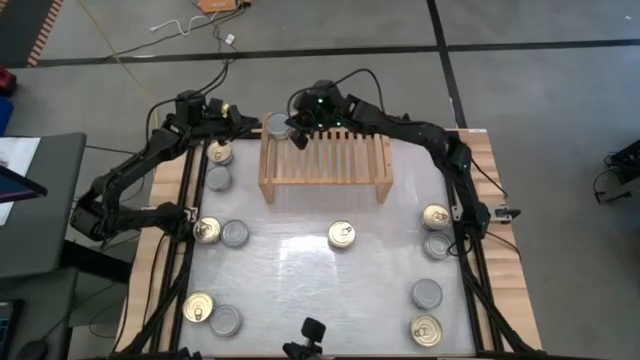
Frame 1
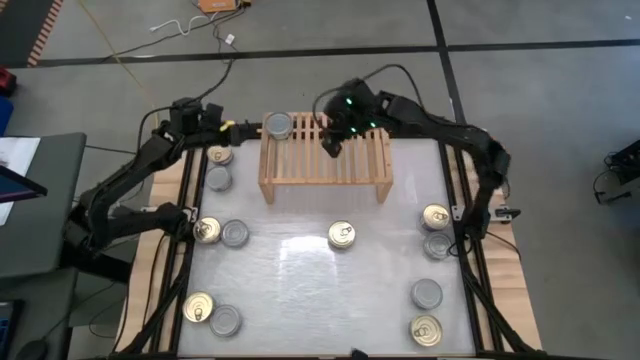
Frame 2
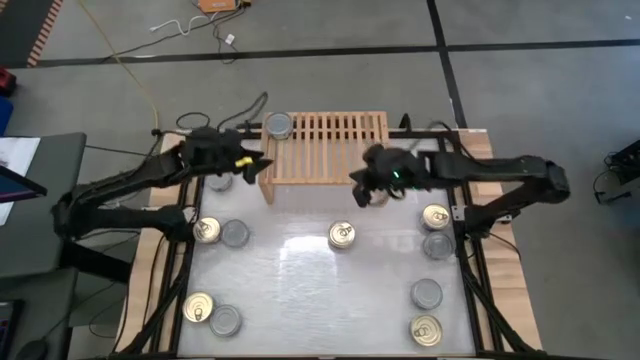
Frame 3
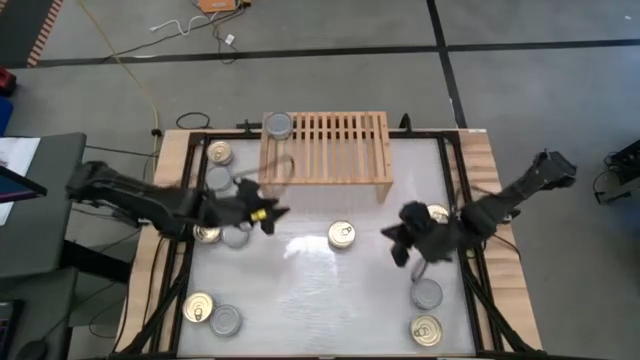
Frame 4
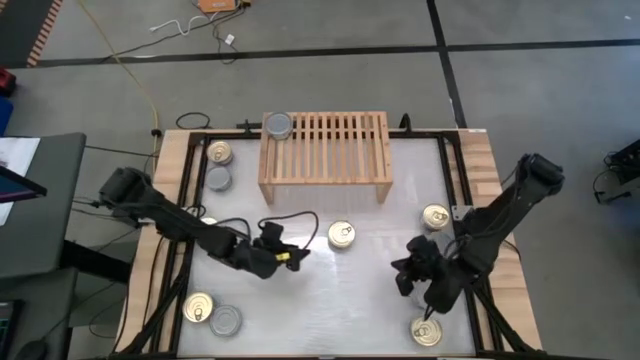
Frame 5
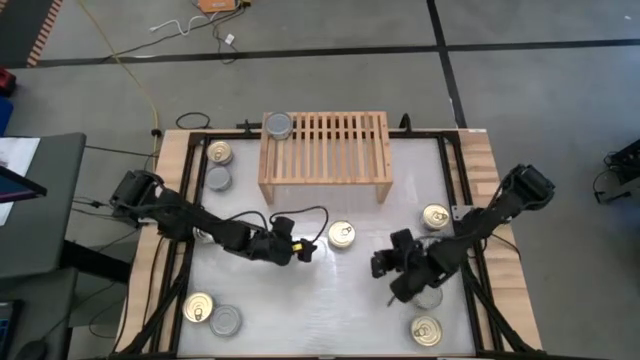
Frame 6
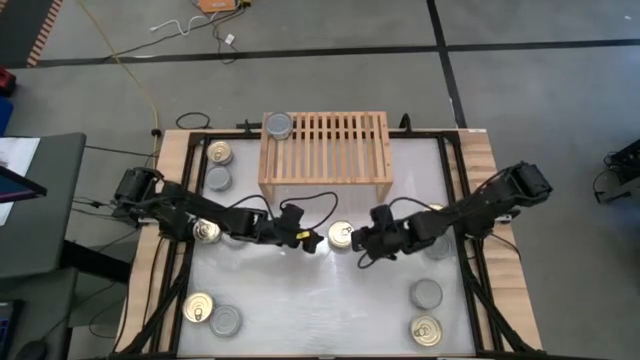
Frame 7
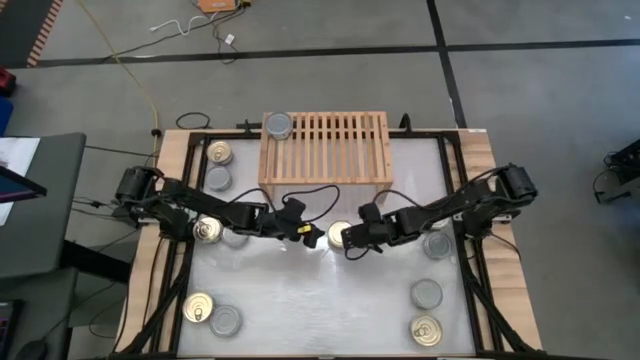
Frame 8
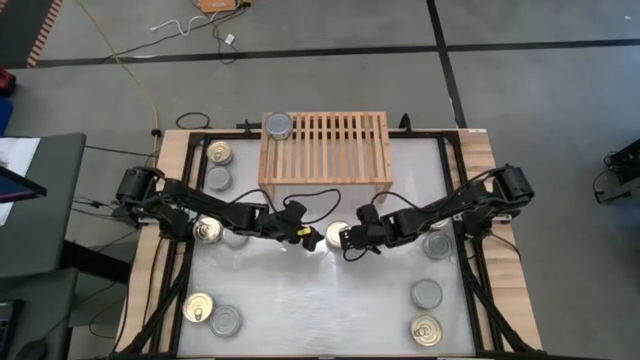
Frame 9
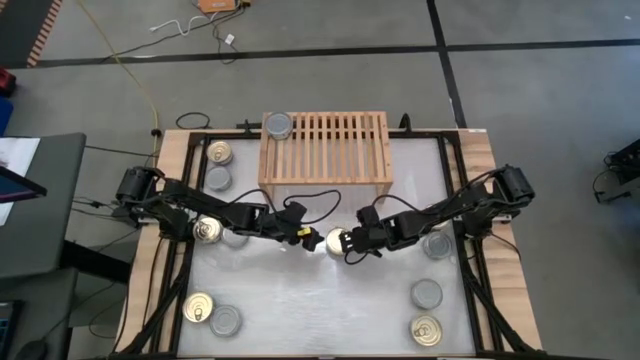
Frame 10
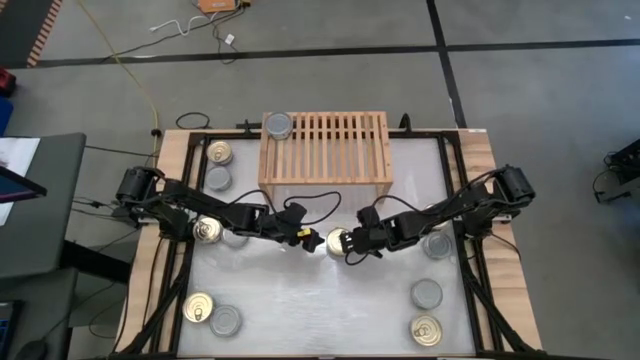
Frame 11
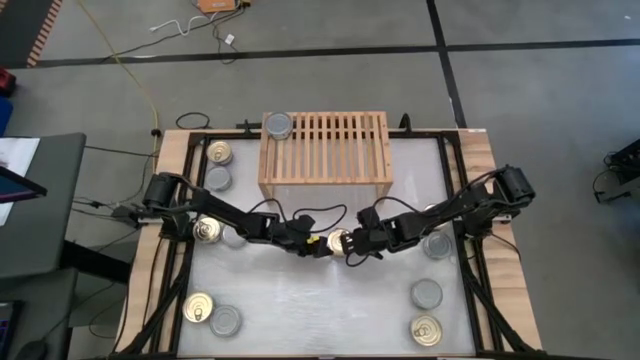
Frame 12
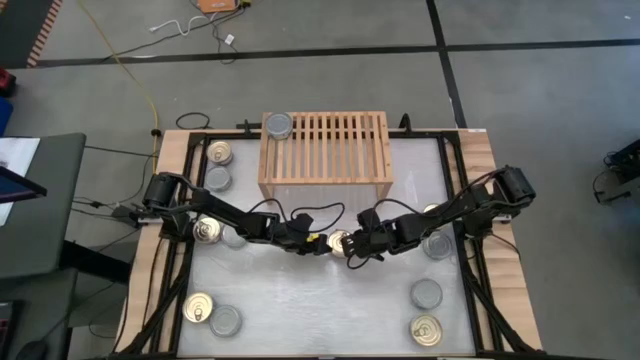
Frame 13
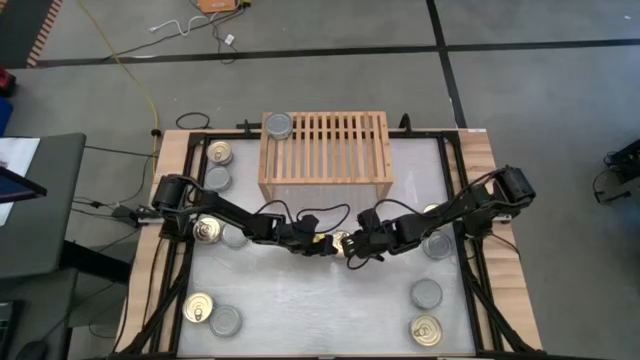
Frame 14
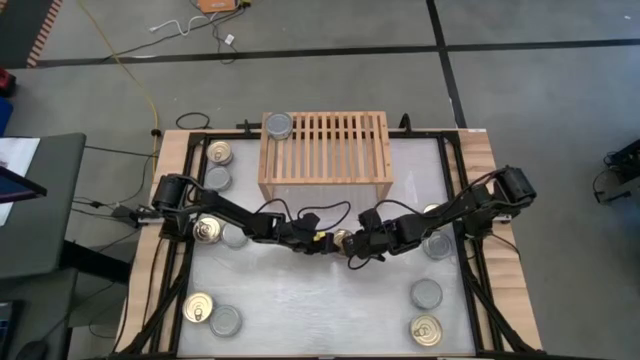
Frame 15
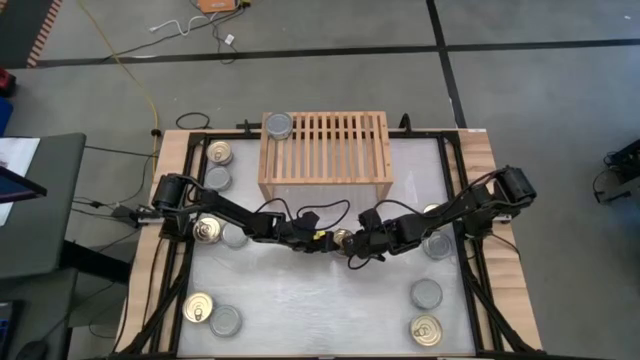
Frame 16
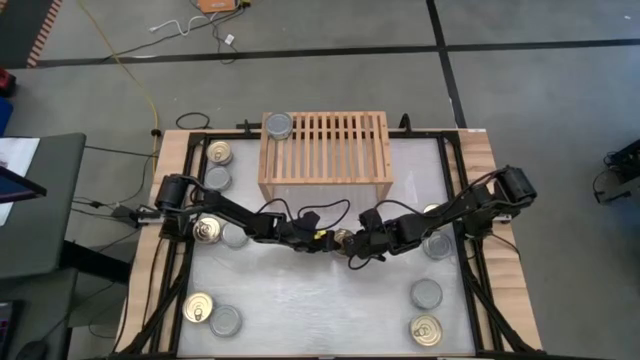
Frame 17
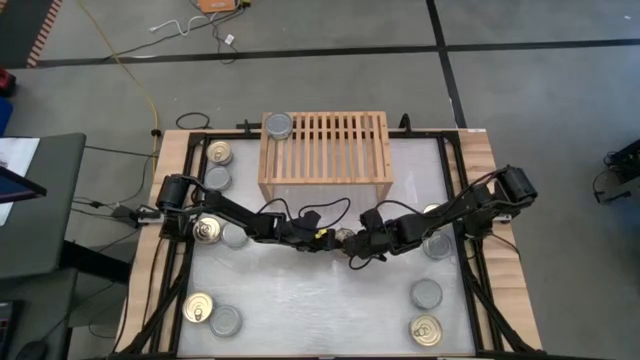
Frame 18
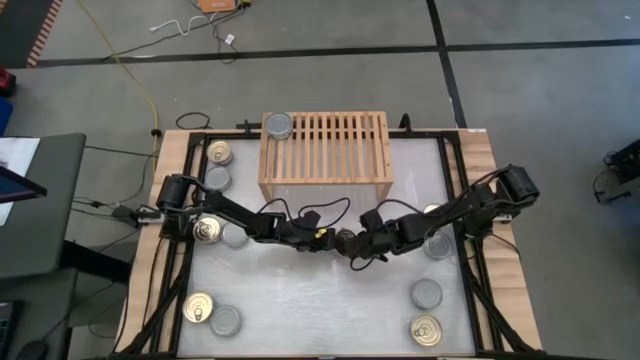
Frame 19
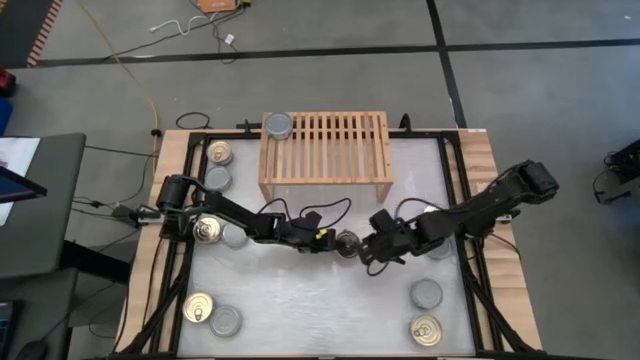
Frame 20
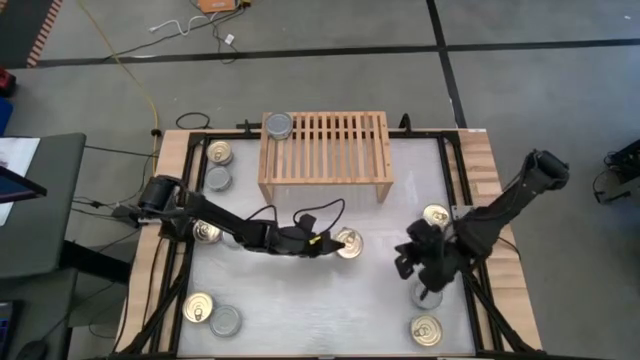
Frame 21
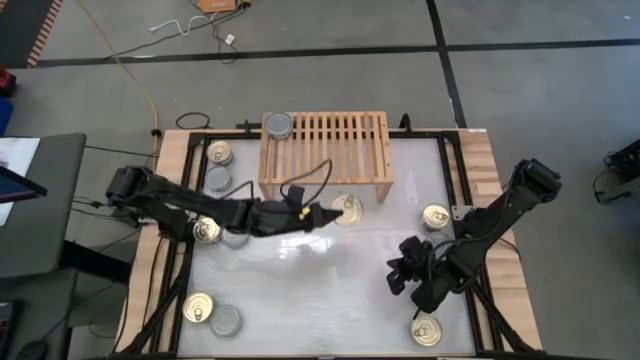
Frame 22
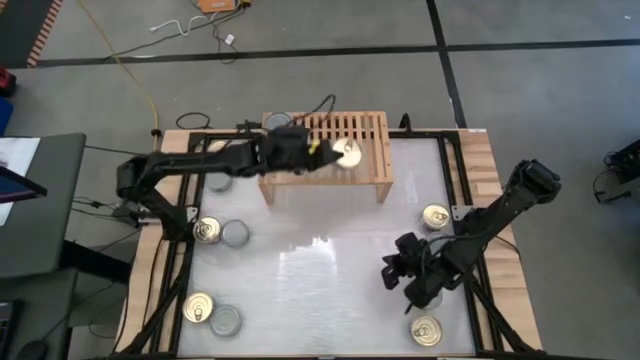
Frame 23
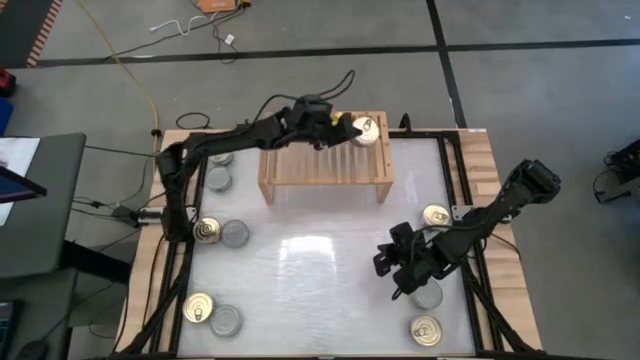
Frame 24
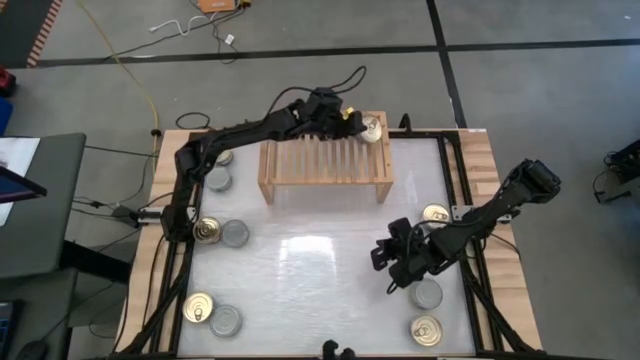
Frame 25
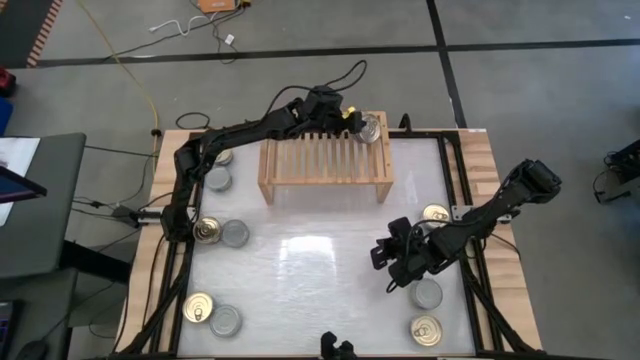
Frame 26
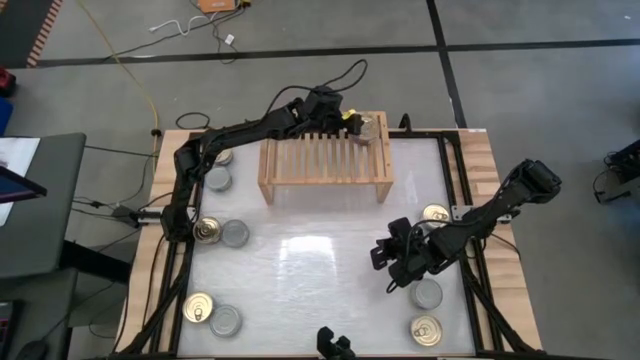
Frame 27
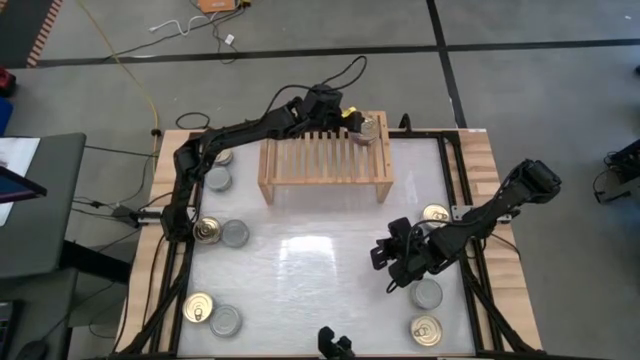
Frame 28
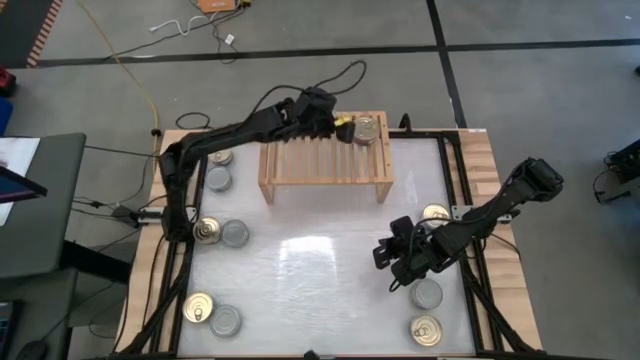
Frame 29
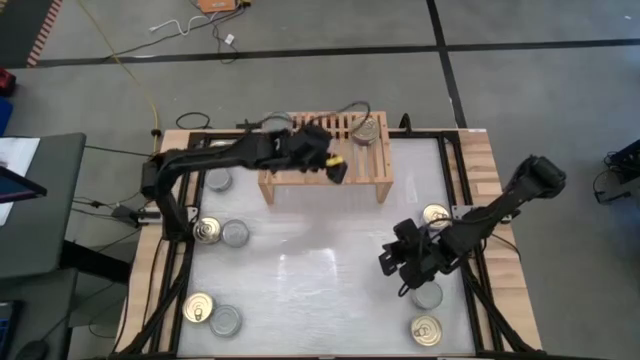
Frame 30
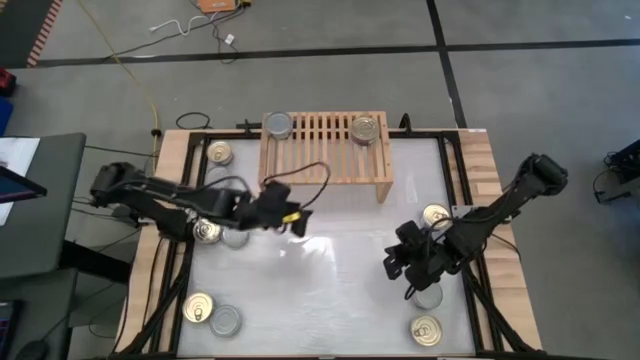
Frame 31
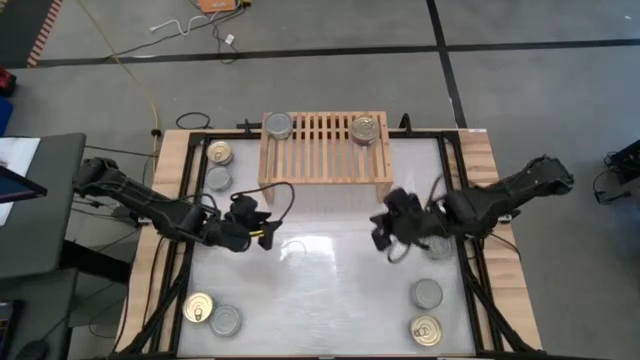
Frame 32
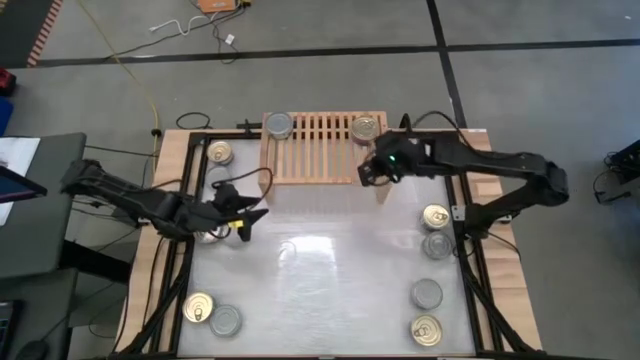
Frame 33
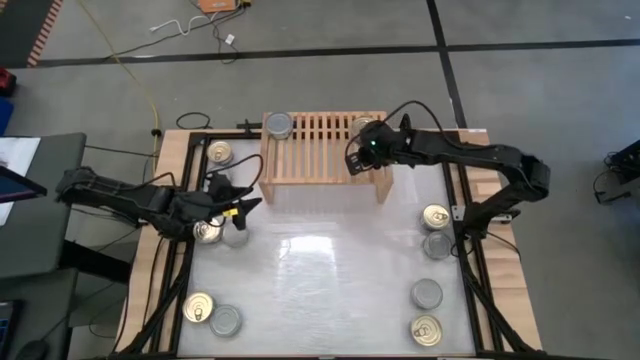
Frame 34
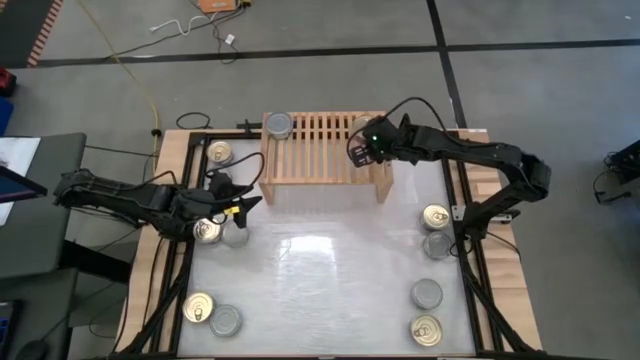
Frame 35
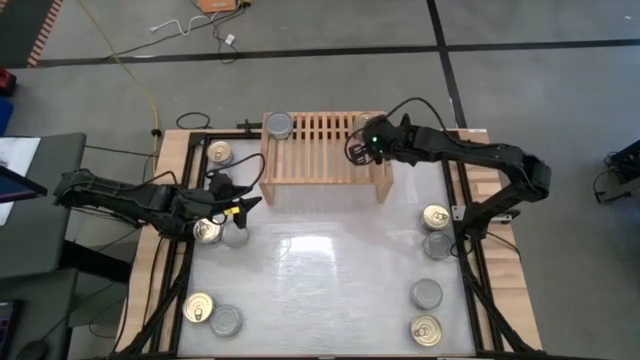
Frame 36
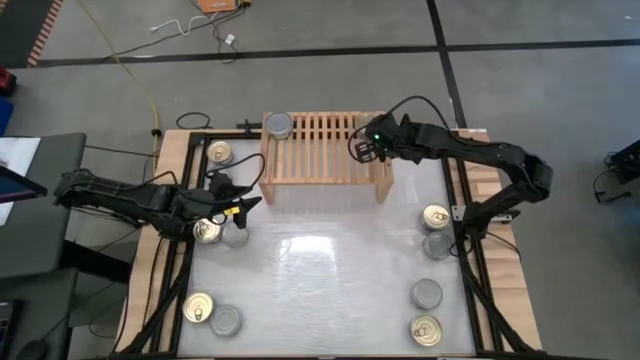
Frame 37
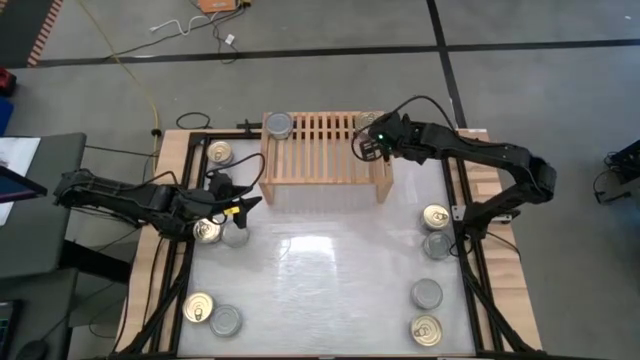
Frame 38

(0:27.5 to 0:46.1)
Task: Stack canned seafood by type on shelf
Put the blue tuna can on the shelf

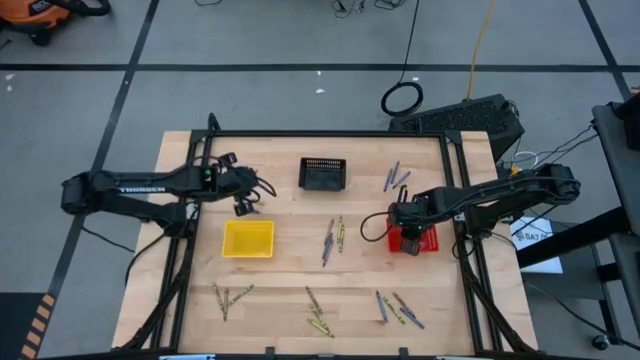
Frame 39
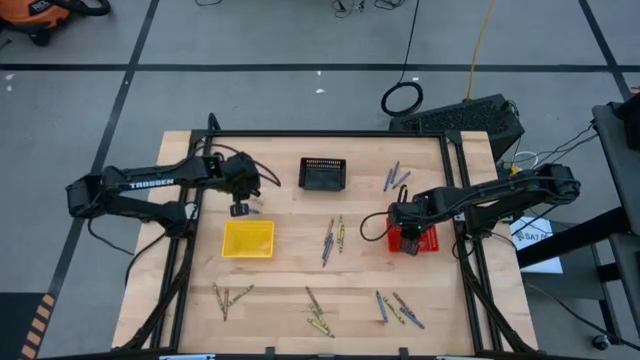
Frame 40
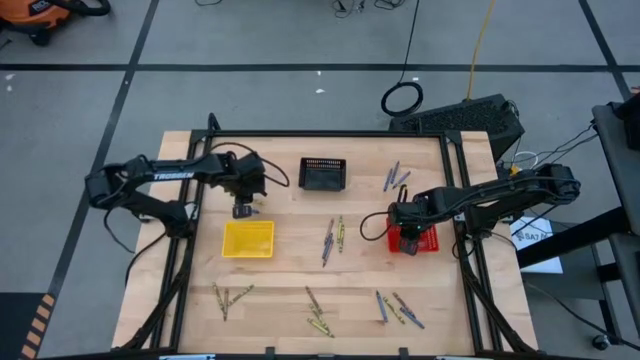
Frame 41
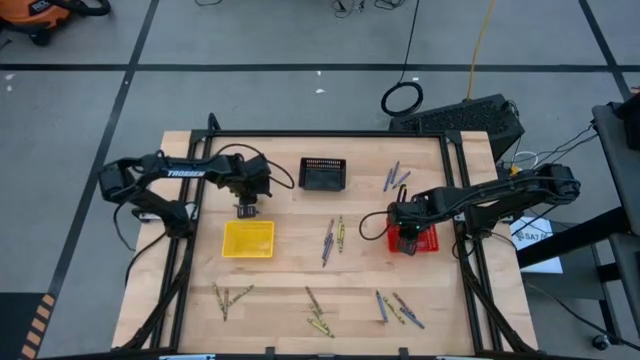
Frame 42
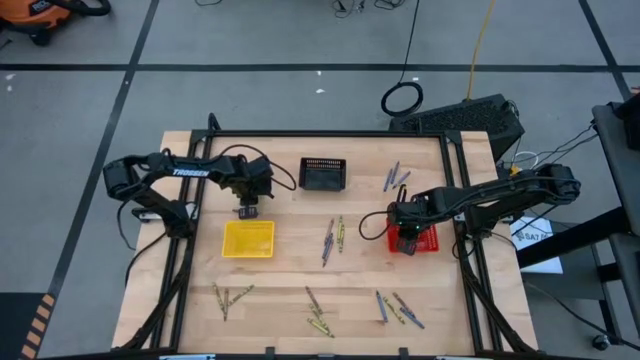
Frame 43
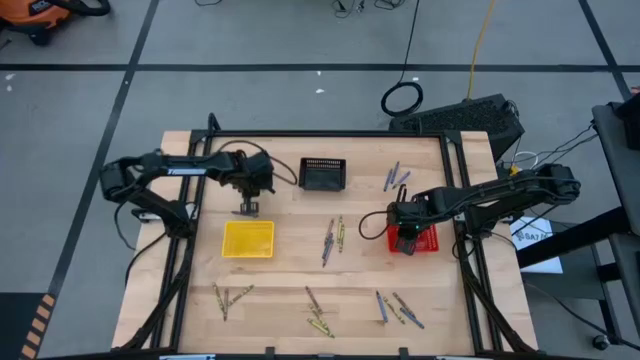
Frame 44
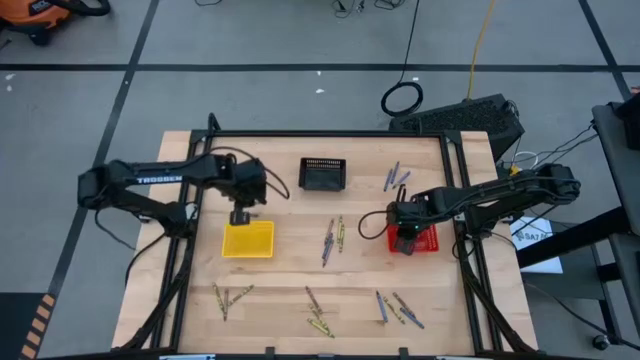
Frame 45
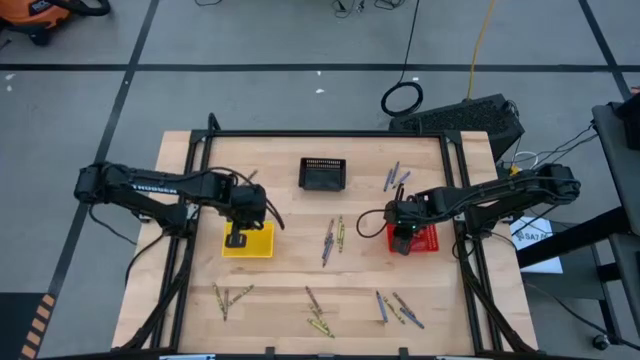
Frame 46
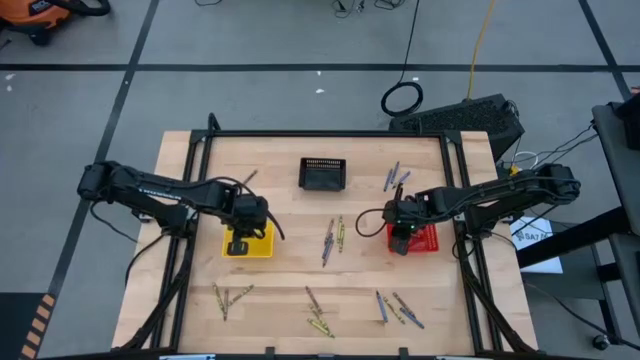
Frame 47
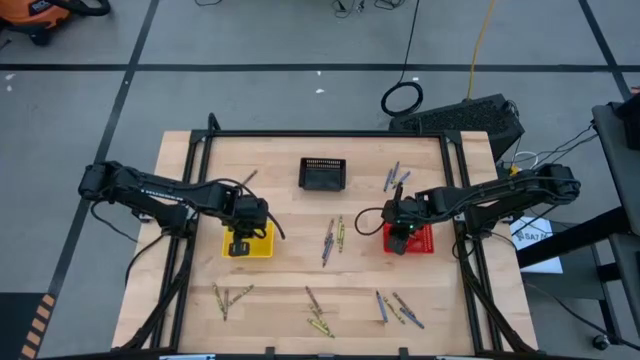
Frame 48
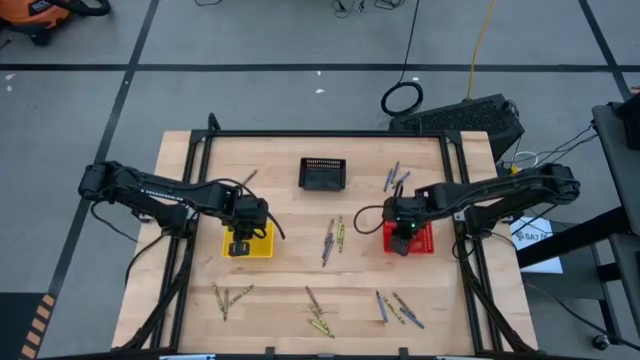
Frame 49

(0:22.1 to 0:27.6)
Task: Sort crayons
Put the light green crayon into the yellow bin
